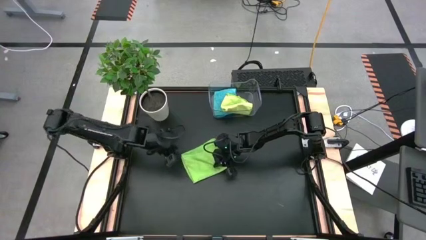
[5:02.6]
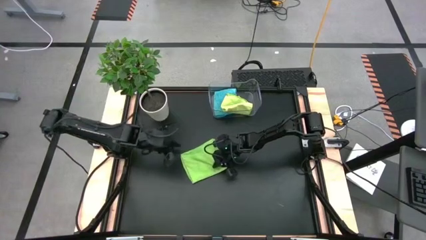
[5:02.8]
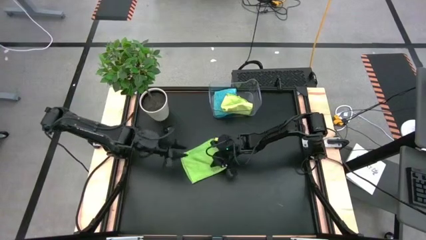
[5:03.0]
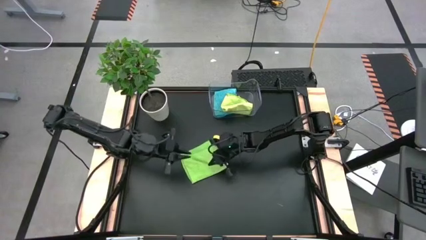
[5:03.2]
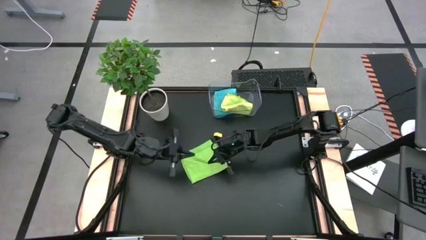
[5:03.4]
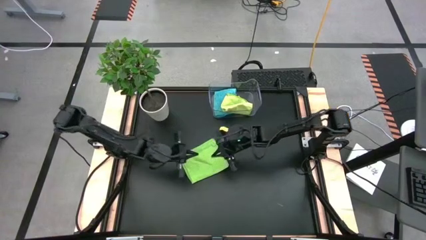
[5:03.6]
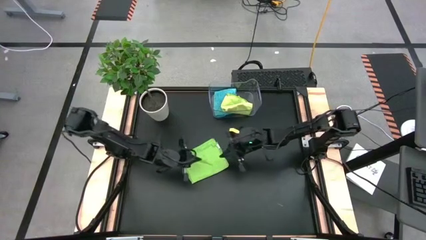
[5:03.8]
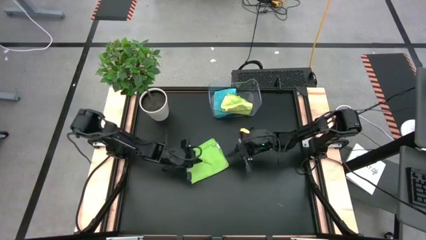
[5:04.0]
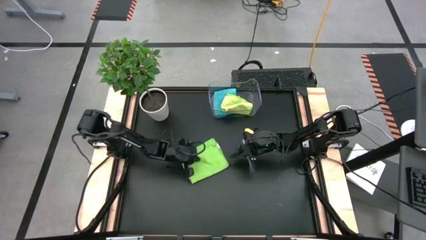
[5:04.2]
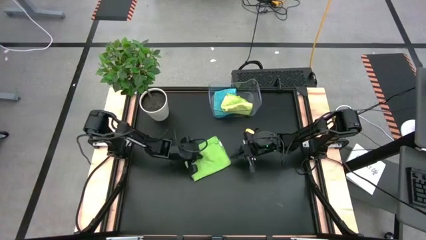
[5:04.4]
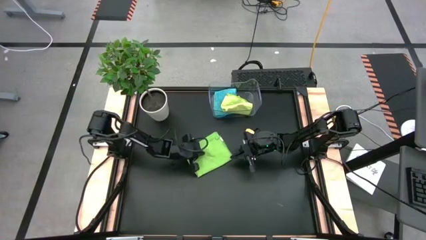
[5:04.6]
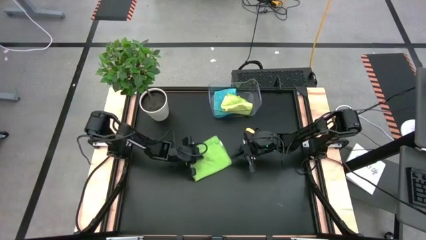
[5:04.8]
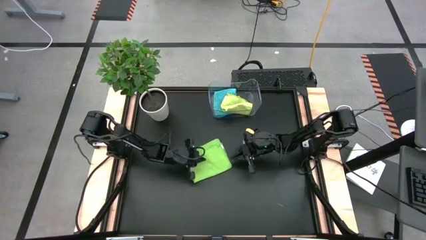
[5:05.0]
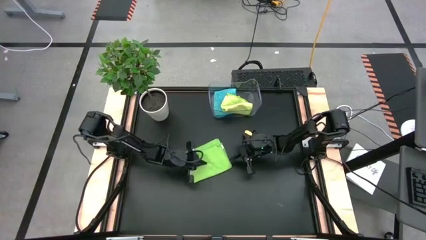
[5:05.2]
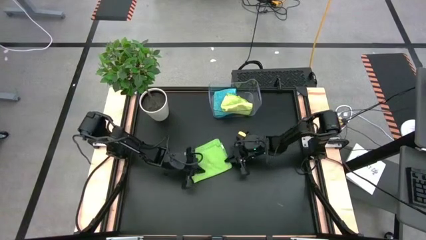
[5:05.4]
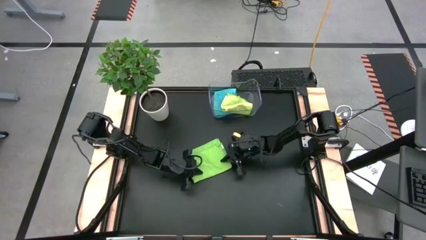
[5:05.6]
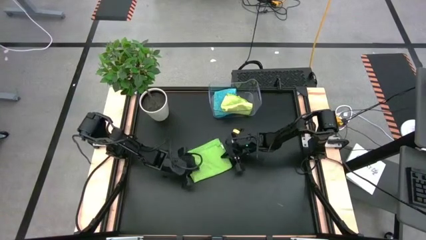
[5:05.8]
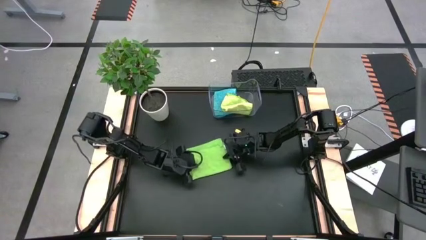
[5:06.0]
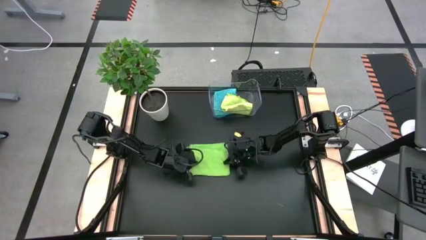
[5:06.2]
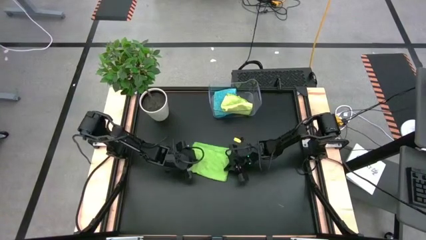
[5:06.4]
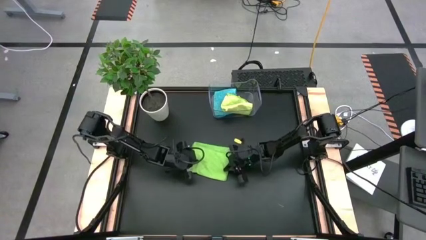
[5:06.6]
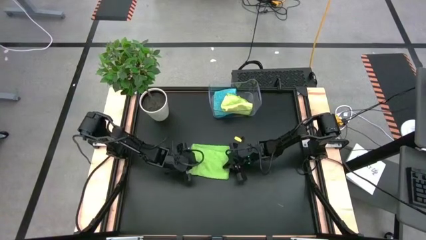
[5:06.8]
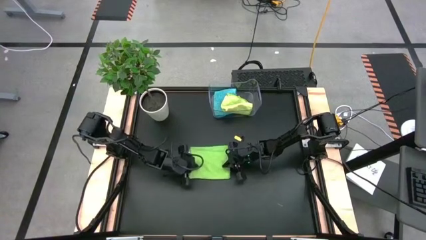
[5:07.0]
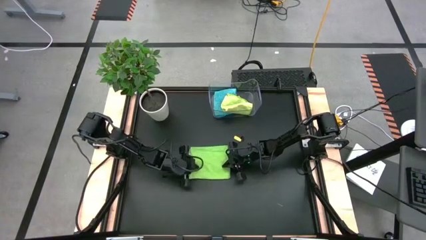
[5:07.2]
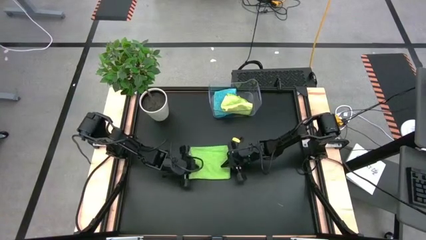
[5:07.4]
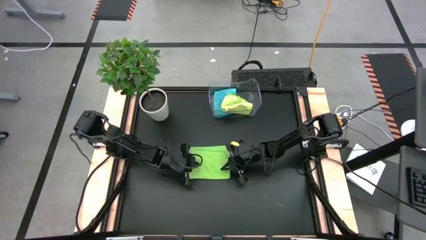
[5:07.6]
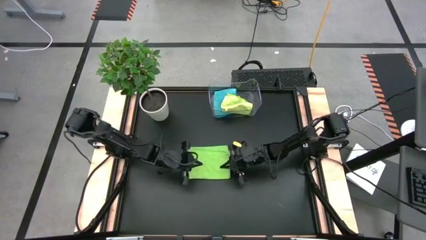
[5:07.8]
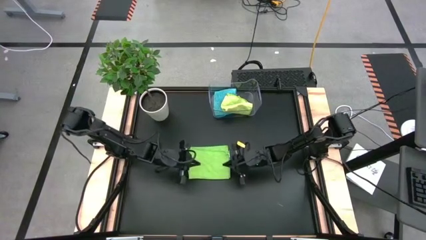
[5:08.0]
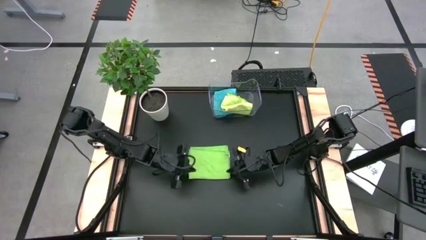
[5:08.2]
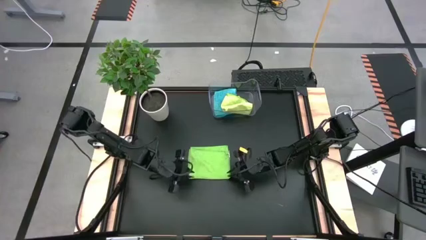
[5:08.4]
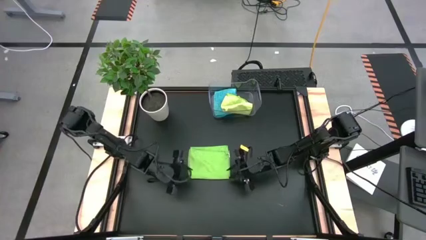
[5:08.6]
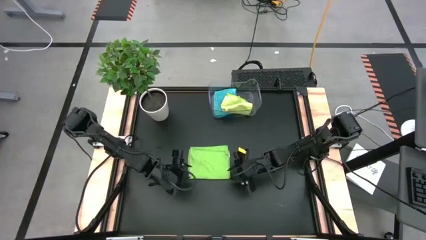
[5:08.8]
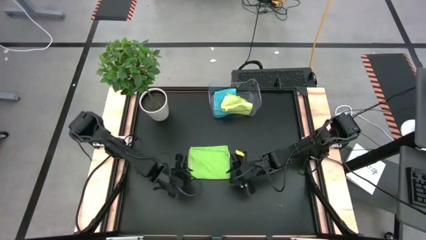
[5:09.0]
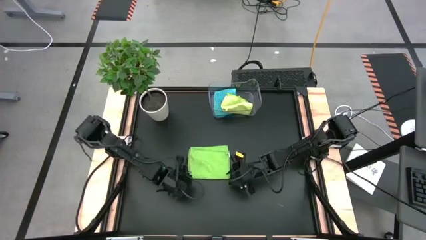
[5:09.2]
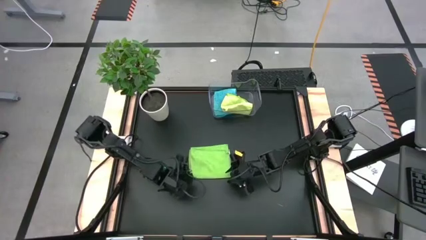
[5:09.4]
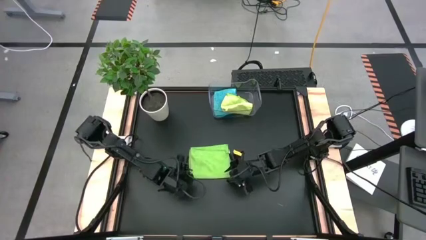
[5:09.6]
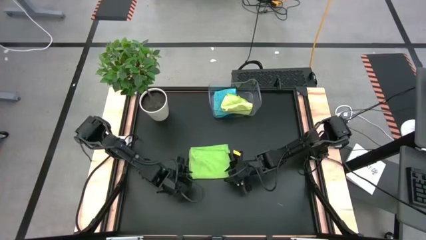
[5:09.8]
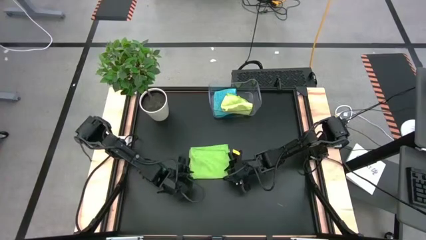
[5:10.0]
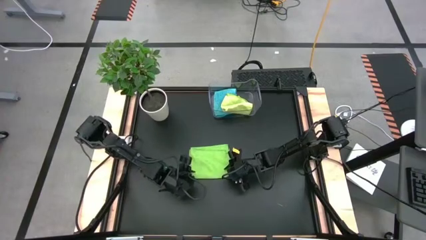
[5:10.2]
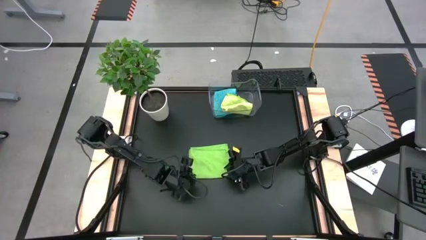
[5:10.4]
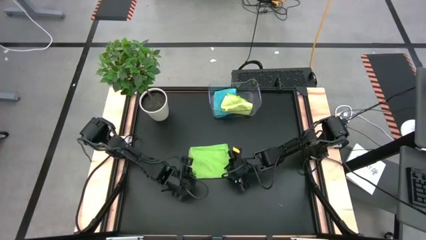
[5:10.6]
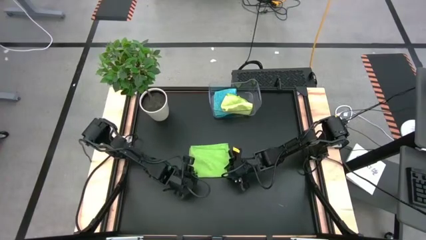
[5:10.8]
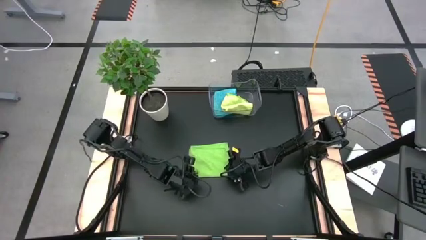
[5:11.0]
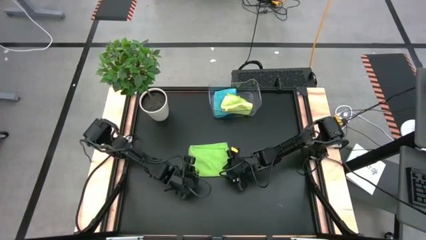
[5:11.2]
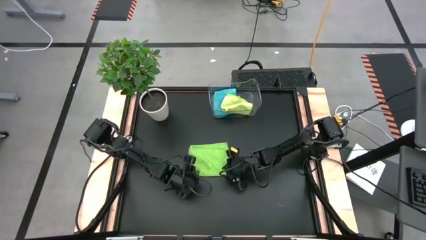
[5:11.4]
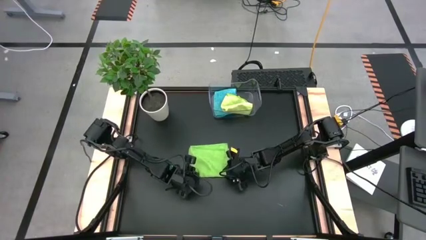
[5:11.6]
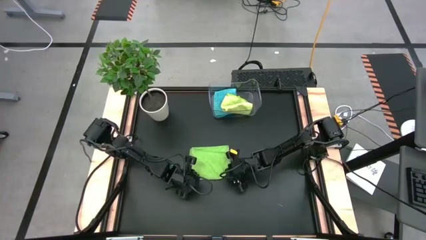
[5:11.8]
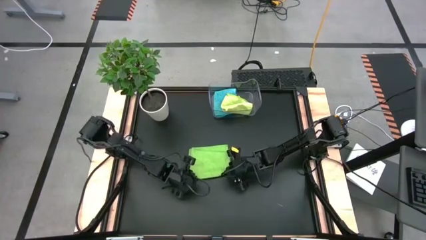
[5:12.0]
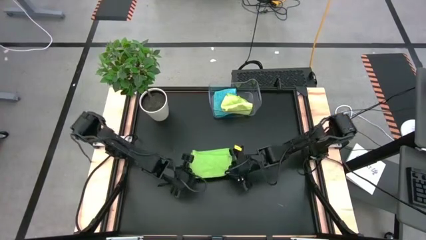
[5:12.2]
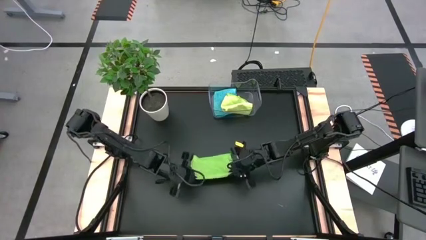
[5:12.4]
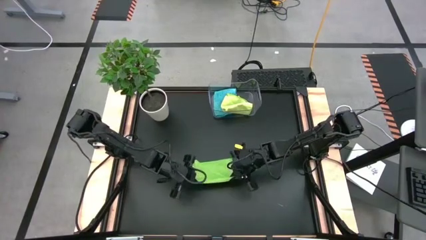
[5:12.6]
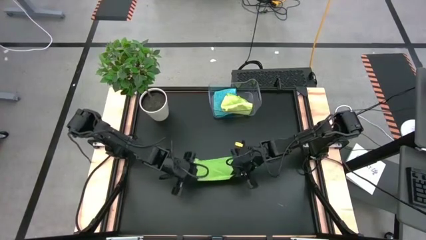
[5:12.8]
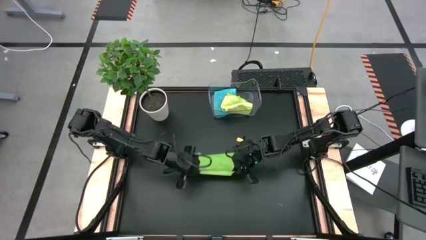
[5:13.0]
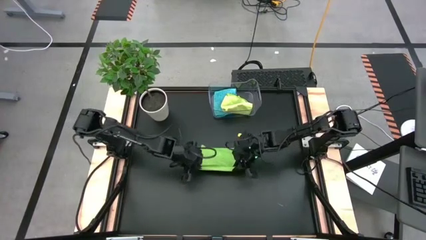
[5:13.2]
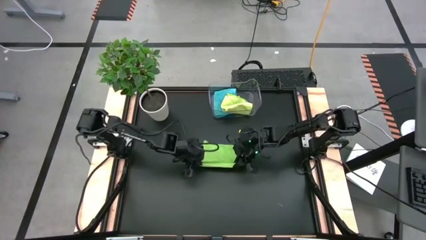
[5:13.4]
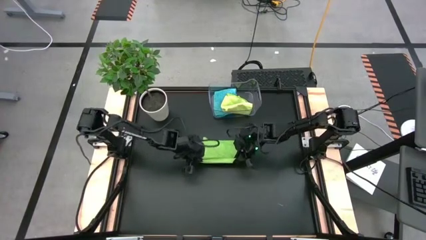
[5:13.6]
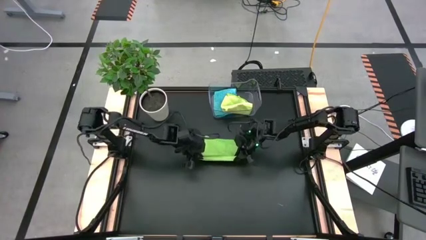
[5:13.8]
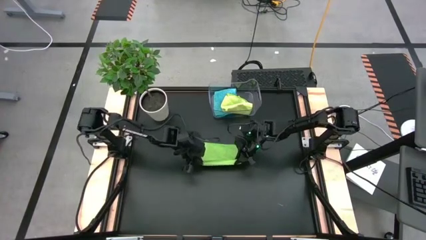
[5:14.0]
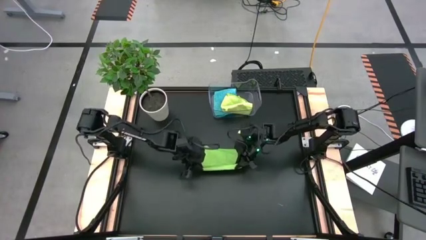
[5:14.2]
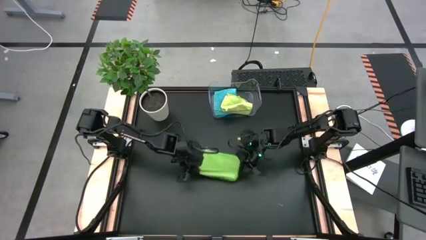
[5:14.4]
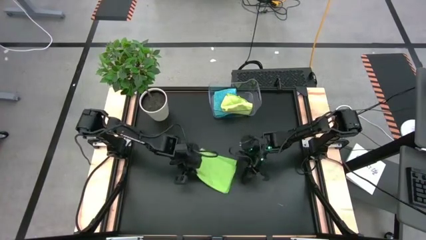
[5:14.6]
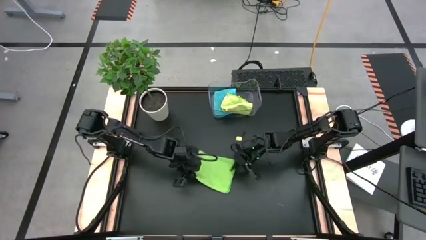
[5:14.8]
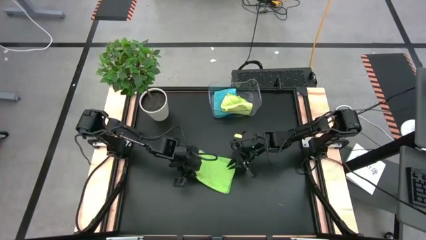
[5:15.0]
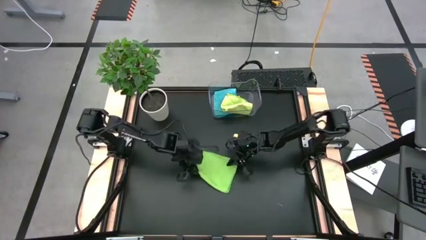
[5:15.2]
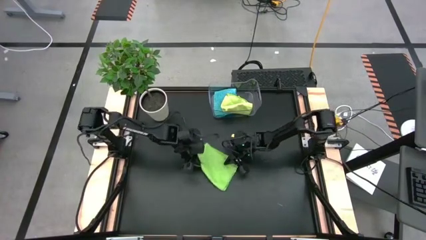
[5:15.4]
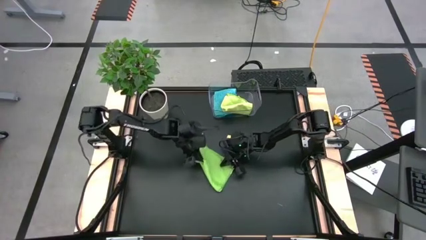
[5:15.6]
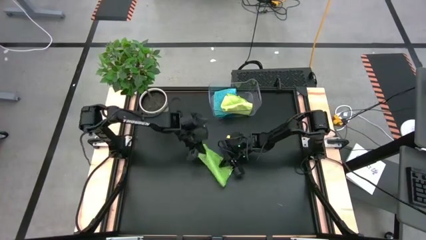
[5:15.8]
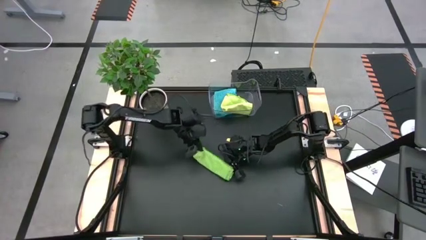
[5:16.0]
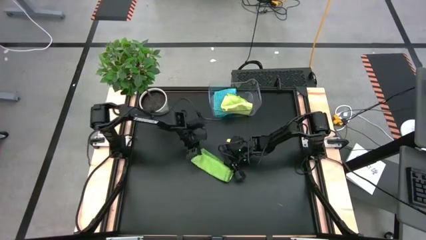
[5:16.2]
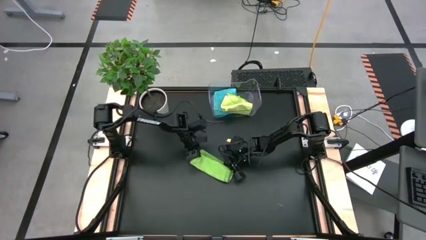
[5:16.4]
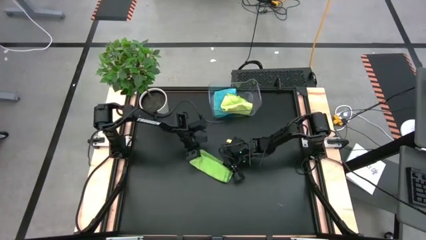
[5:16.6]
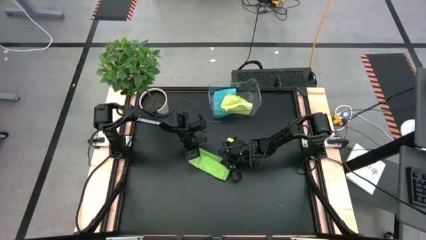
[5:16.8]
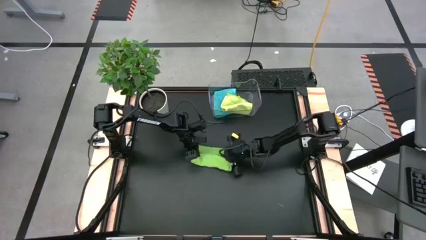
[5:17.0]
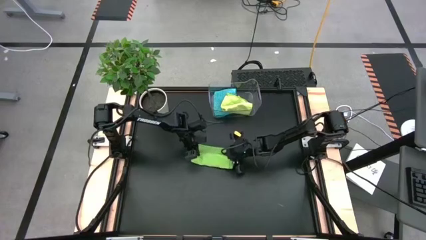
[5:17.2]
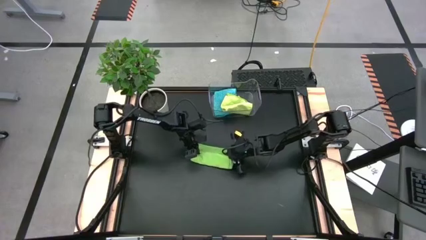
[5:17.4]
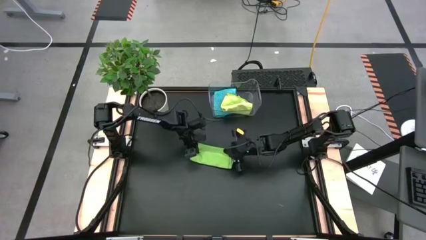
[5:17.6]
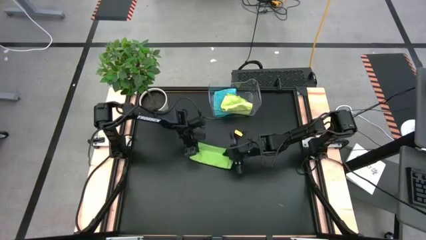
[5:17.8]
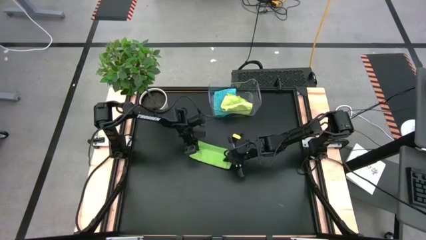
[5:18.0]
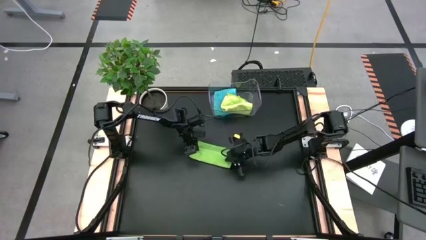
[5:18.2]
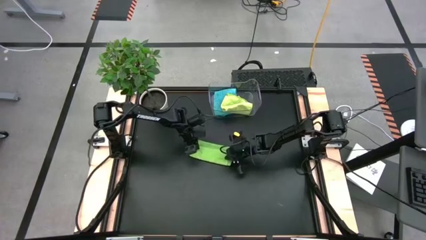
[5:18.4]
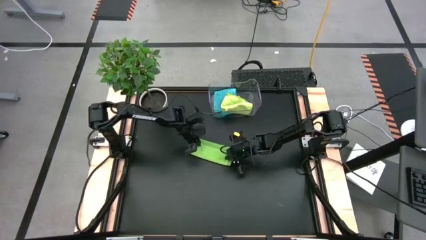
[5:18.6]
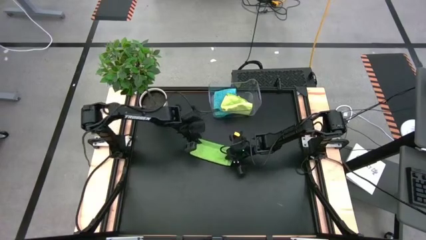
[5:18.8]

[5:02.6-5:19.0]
Task: Fold microfiber towels
Fold the green microfiber cloth
